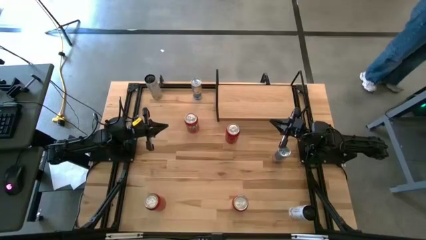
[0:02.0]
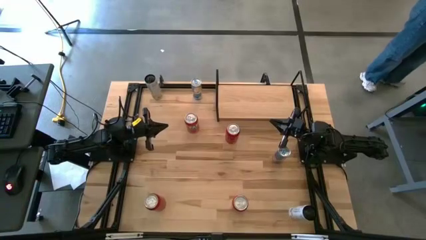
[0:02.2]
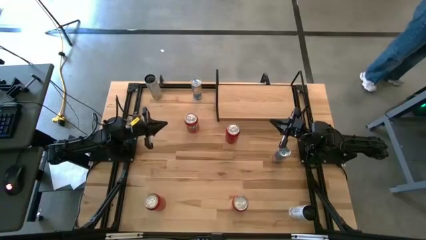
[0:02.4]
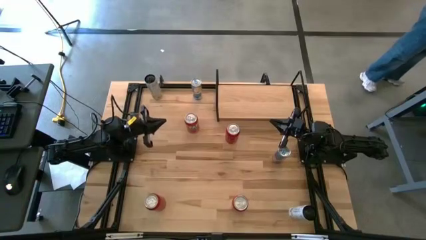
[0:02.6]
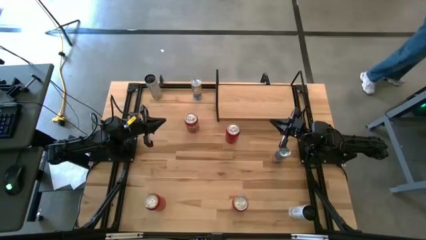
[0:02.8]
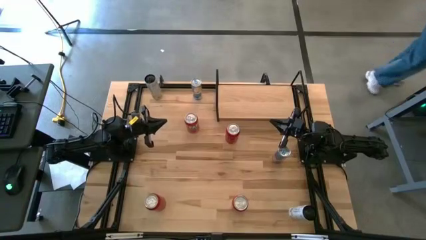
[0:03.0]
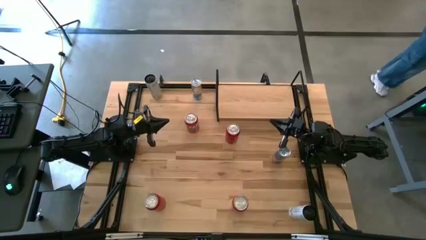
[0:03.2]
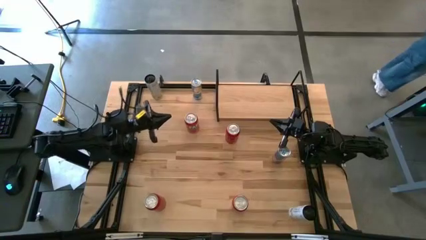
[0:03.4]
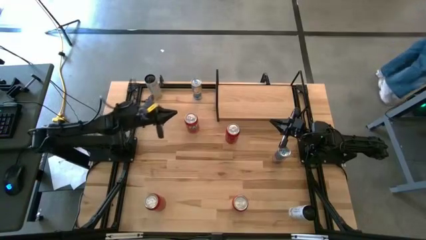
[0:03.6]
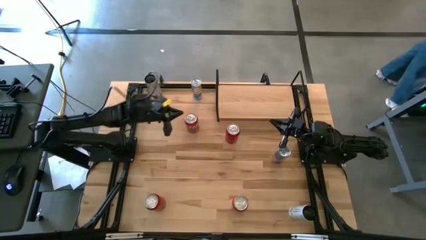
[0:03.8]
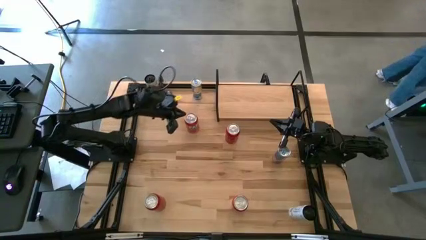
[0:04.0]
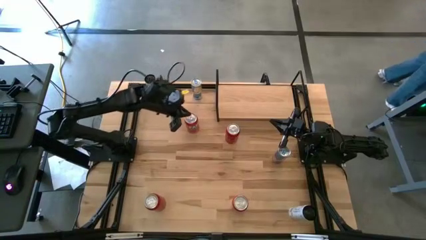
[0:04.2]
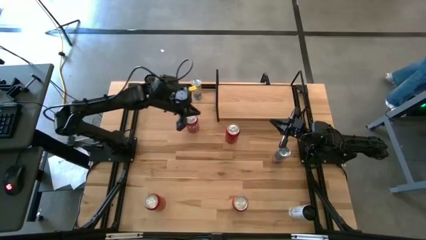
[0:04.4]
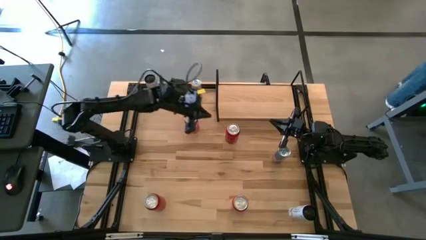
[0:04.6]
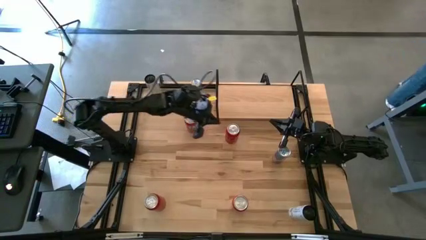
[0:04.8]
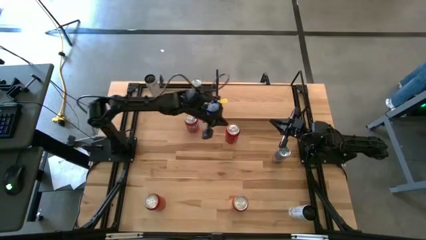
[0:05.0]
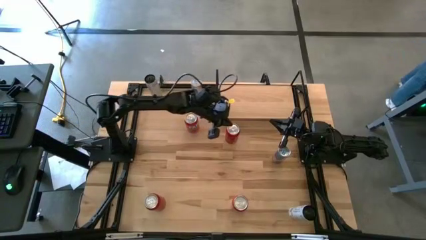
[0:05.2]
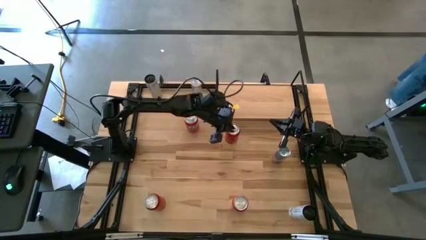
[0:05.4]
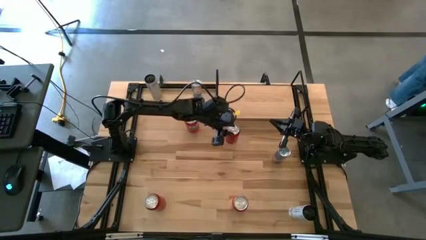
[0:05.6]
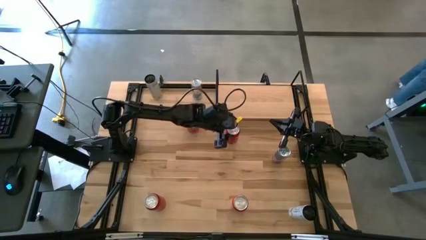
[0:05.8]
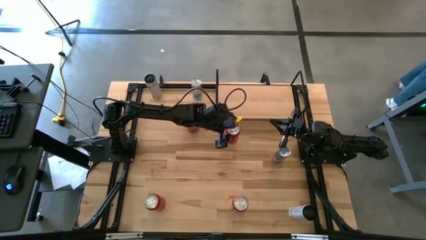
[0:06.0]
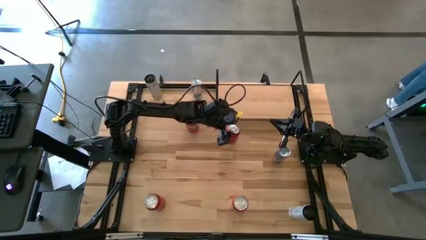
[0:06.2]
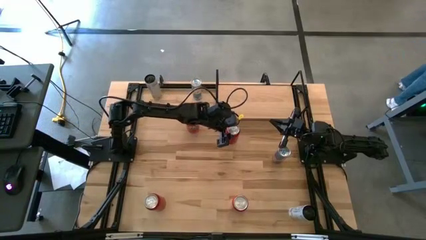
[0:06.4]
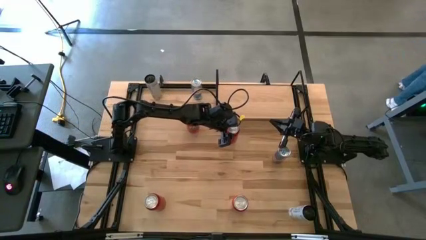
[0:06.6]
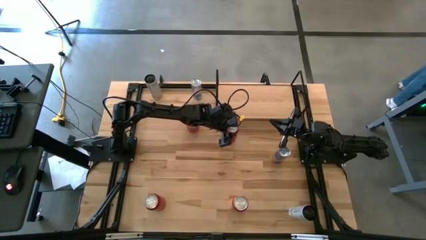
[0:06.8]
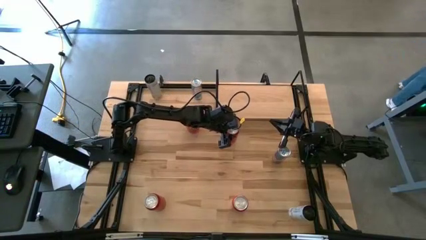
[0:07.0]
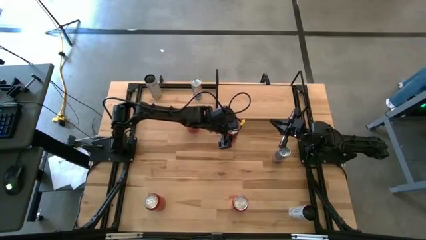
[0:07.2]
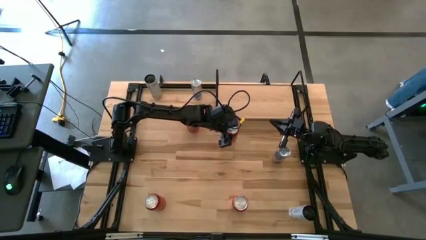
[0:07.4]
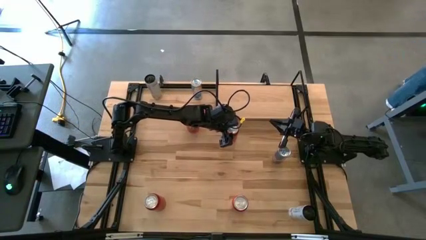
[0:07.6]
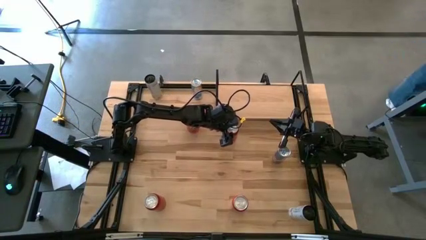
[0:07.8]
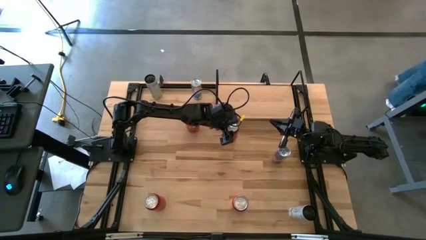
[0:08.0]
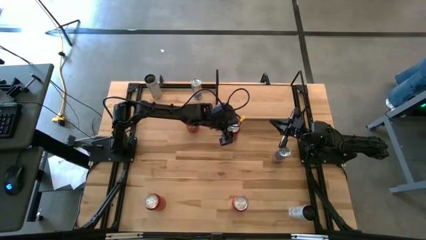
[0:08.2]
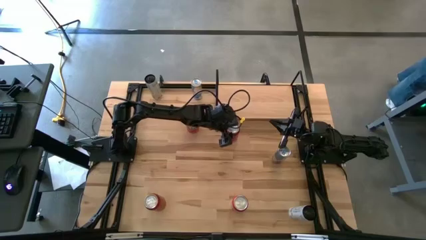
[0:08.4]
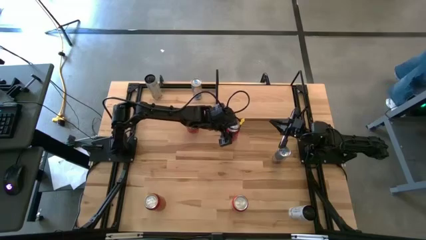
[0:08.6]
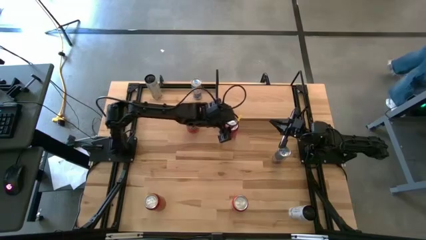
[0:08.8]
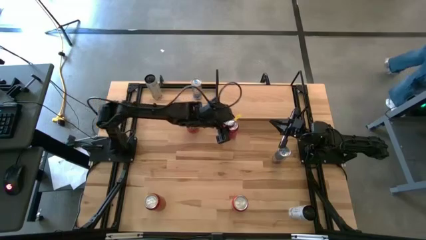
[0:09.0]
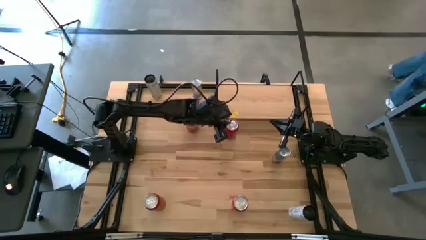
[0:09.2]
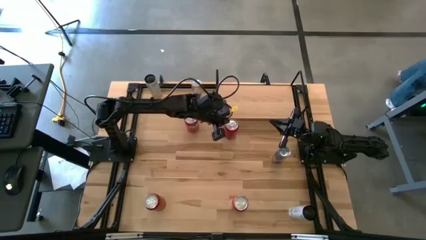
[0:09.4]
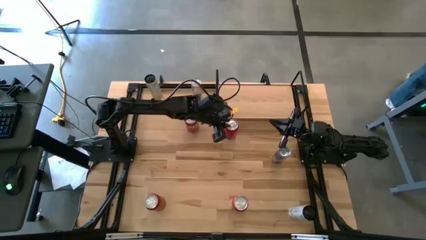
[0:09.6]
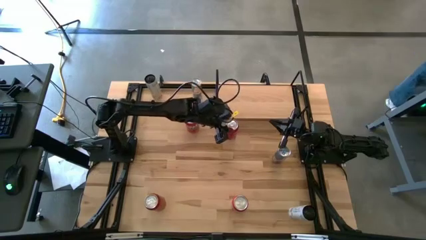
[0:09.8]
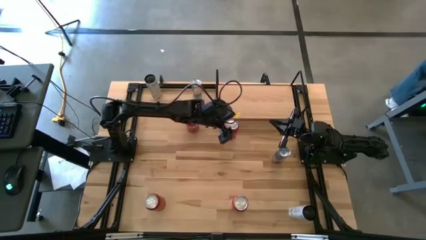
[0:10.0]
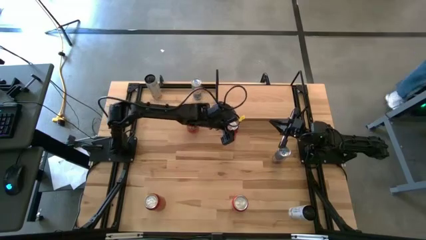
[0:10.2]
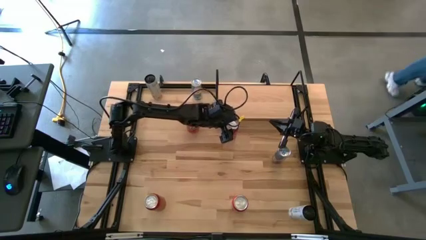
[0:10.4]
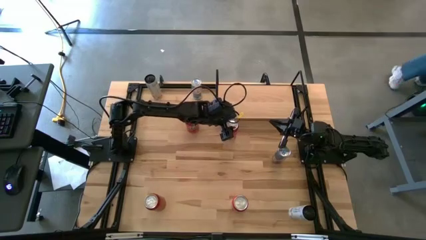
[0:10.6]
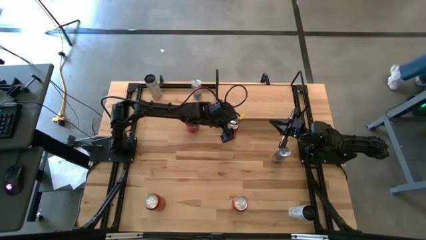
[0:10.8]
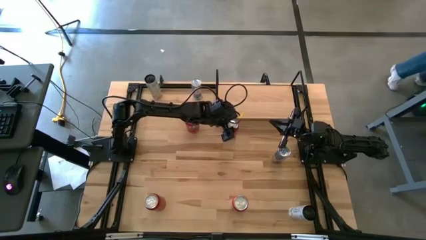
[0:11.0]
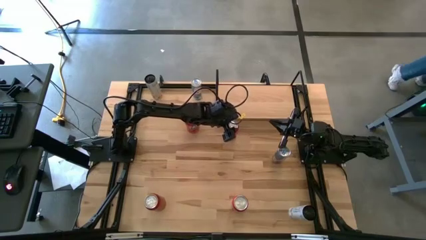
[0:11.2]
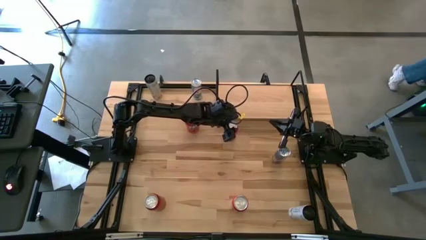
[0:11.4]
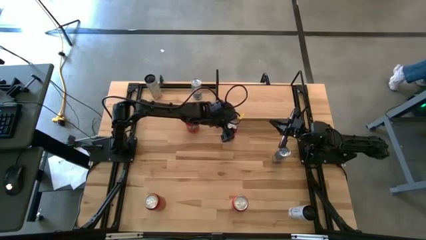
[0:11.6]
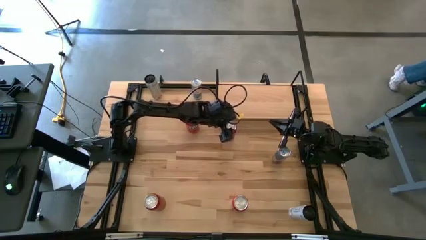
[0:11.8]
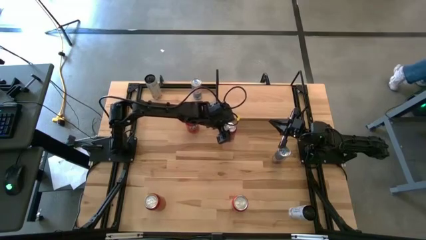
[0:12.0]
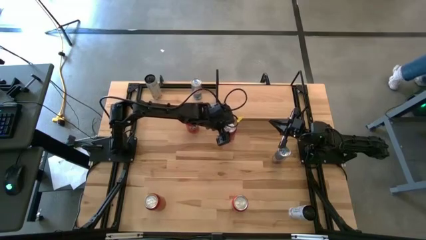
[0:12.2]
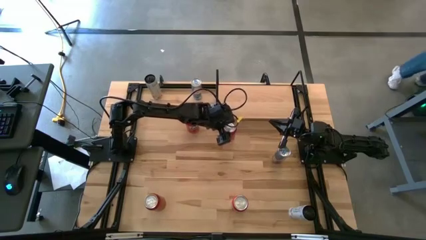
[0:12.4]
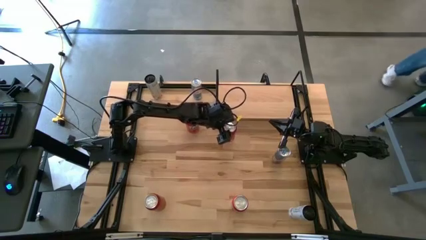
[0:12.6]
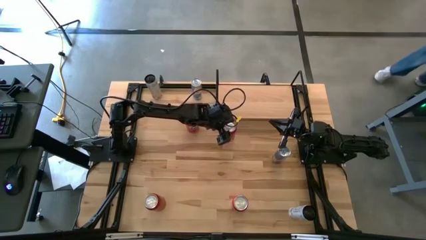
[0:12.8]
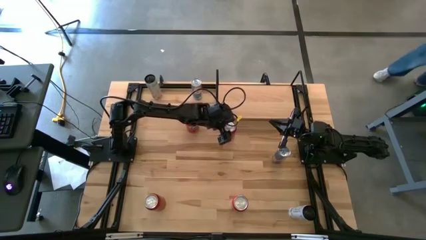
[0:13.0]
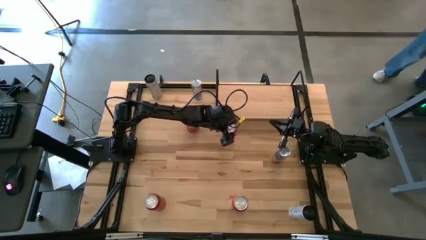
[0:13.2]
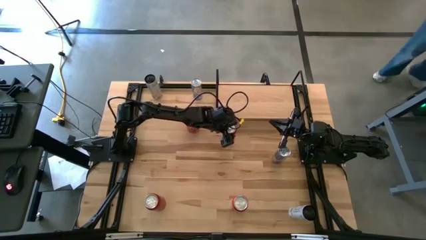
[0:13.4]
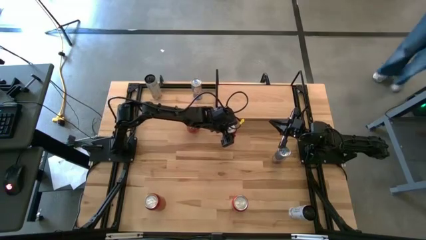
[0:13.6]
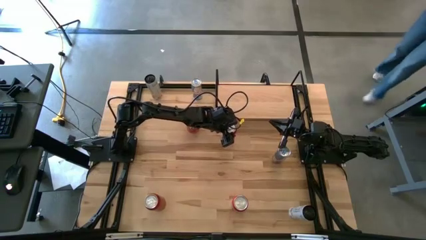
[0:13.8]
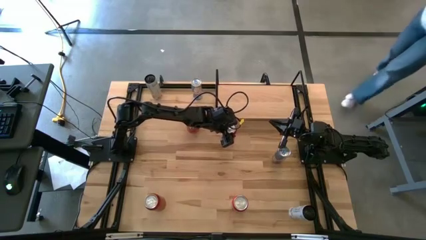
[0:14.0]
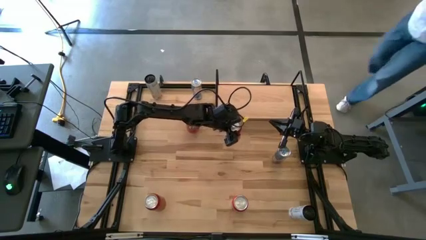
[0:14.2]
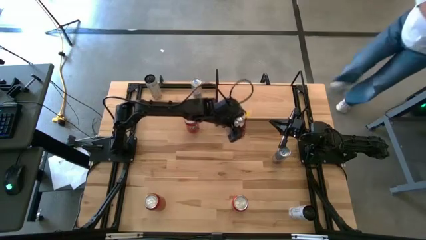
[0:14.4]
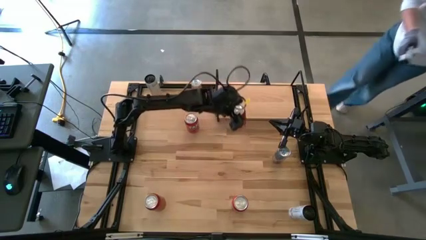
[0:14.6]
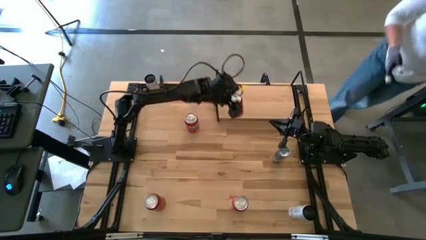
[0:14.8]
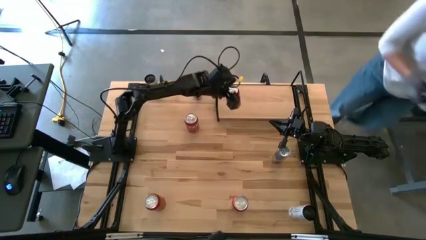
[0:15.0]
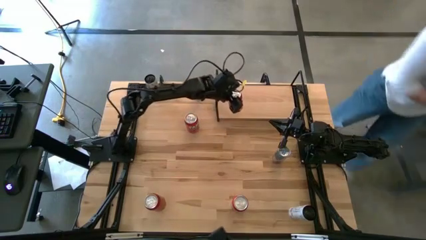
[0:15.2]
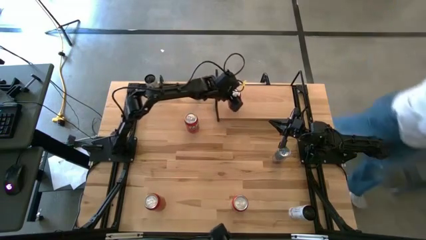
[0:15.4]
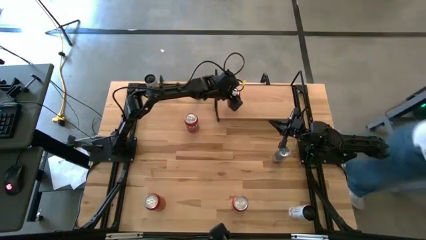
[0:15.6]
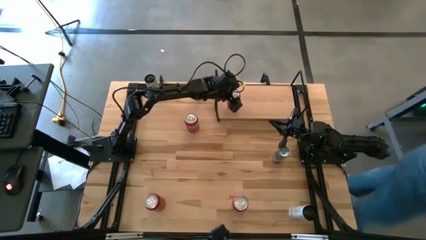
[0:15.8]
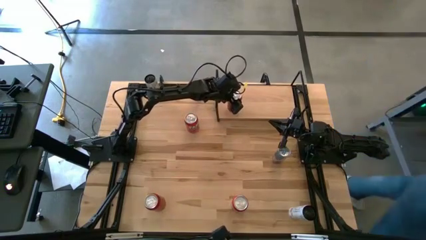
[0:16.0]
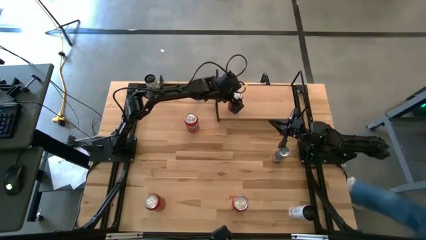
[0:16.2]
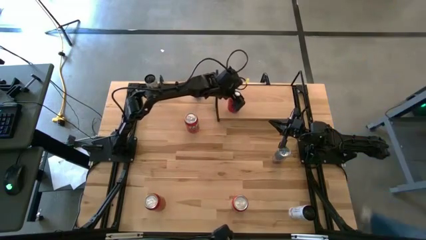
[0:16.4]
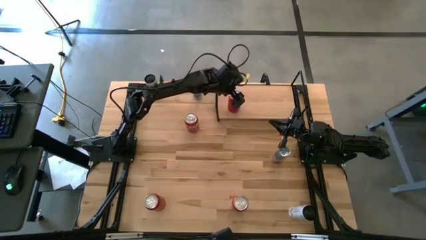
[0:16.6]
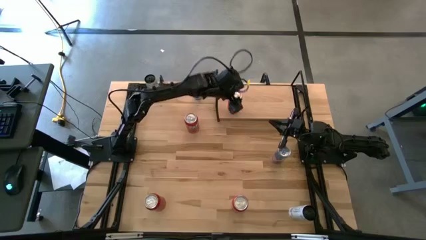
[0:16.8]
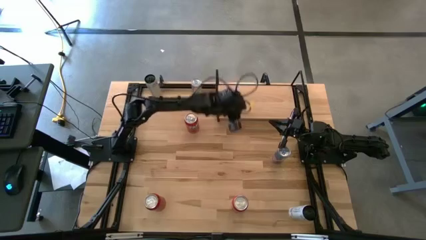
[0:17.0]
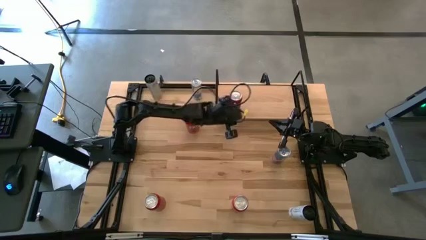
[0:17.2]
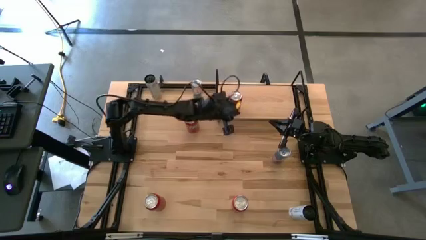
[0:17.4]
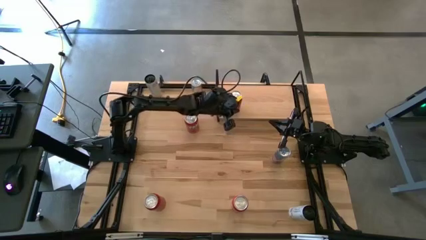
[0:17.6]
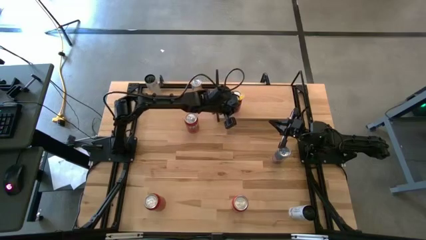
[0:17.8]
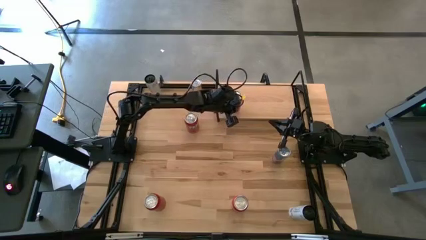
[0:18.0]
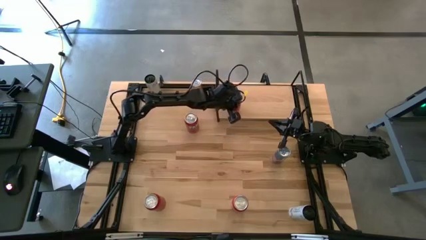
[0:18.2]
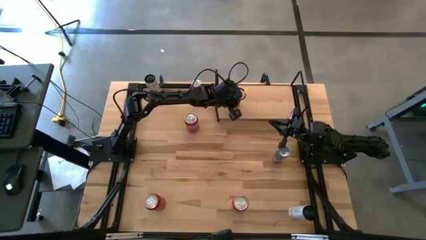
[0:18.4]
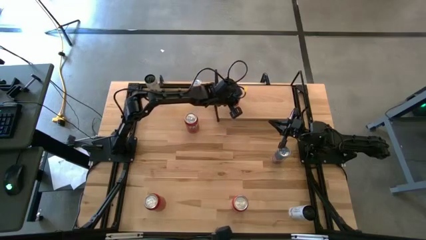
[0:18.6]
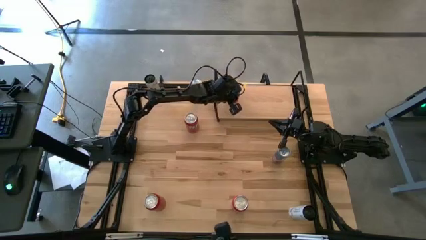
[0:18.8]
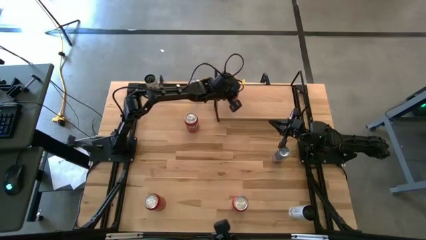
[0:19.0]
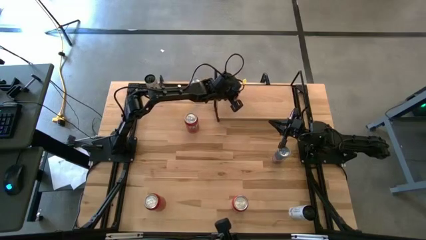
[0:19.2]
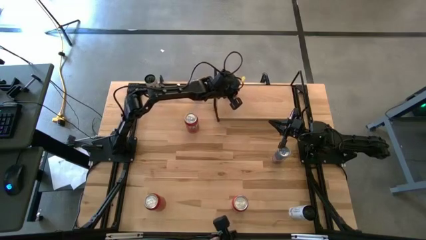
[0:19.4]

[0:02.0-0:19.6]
Task: Place canned beverage on shelf
Put the top red-black soda can on the shelf
